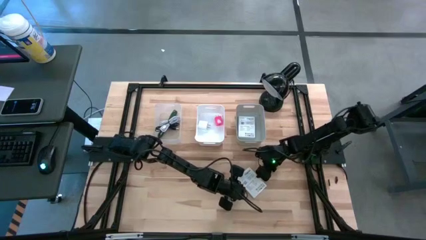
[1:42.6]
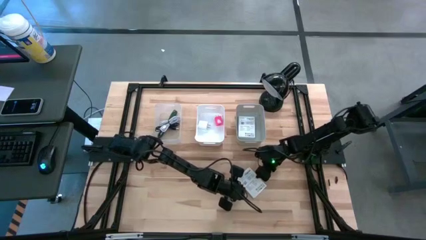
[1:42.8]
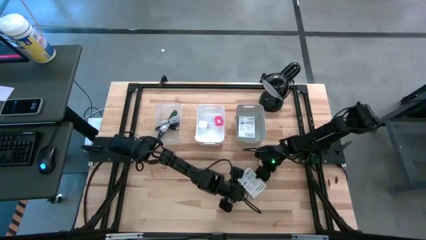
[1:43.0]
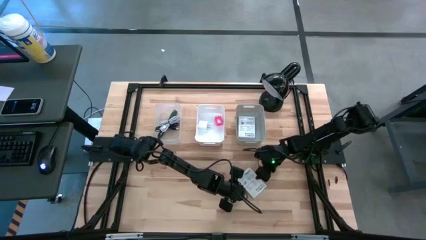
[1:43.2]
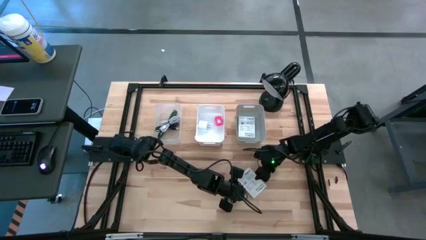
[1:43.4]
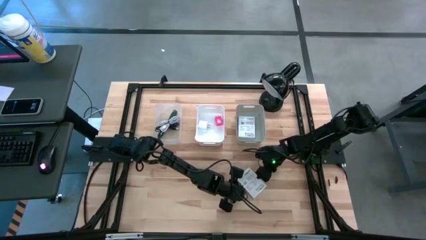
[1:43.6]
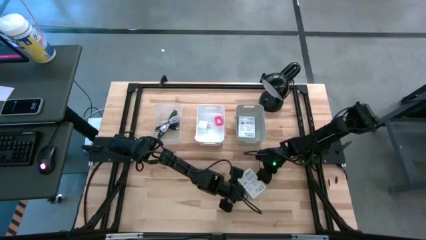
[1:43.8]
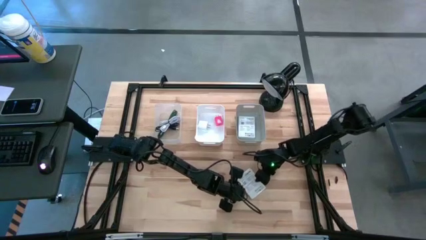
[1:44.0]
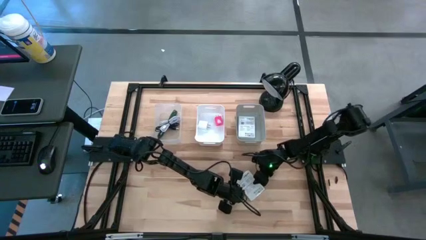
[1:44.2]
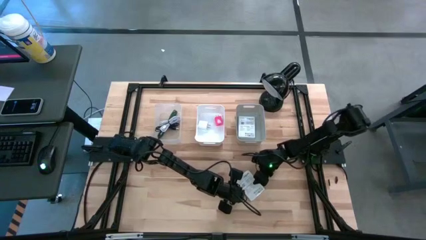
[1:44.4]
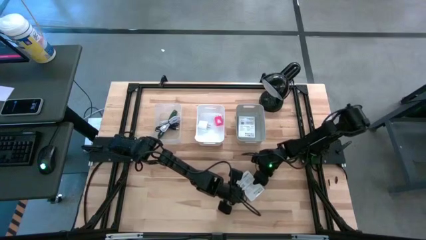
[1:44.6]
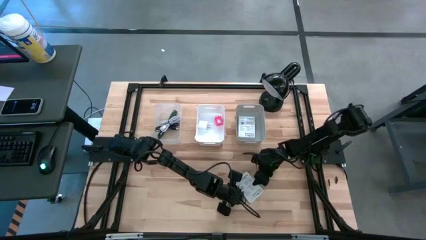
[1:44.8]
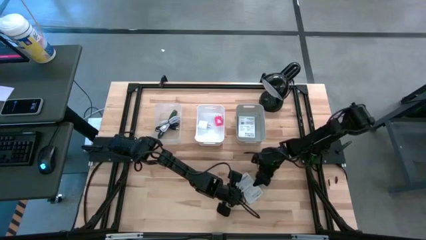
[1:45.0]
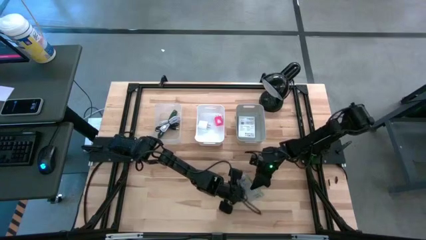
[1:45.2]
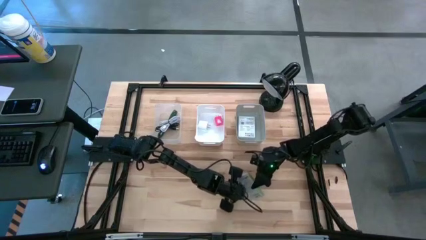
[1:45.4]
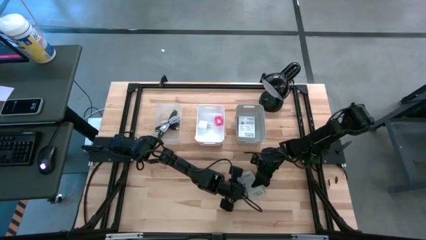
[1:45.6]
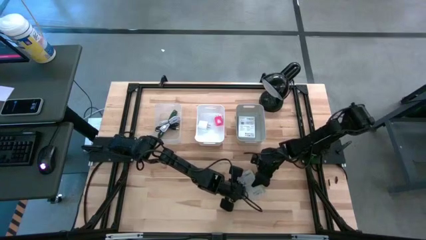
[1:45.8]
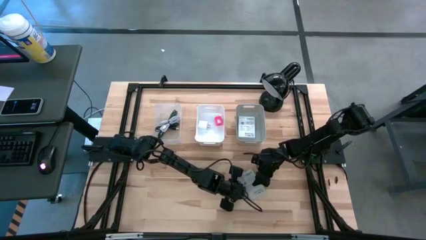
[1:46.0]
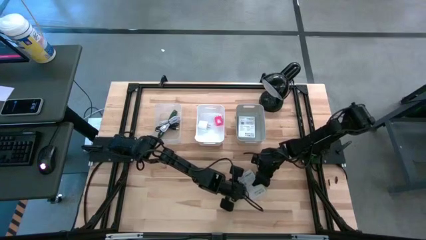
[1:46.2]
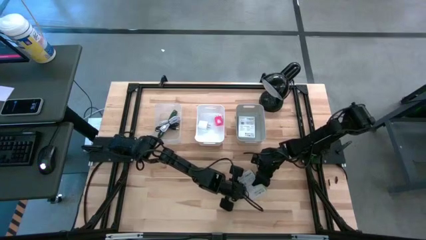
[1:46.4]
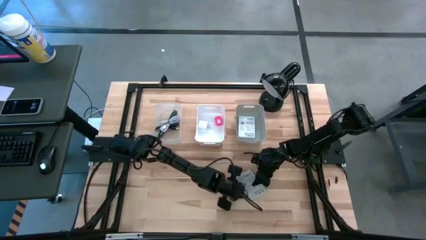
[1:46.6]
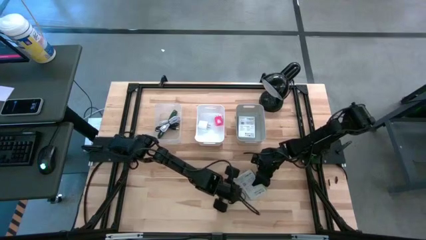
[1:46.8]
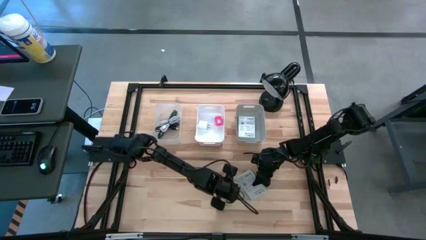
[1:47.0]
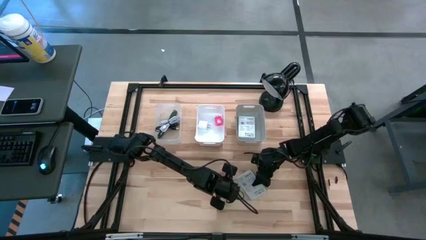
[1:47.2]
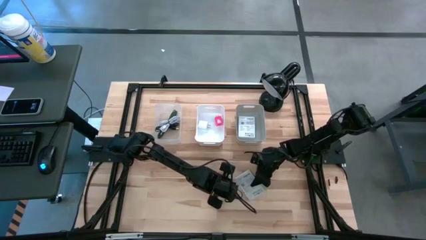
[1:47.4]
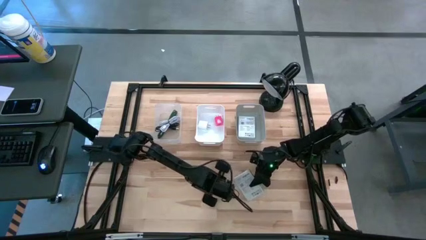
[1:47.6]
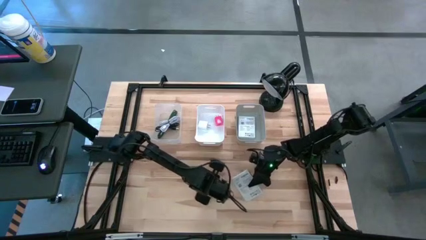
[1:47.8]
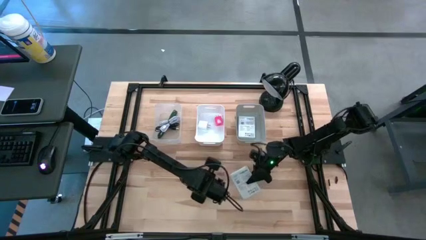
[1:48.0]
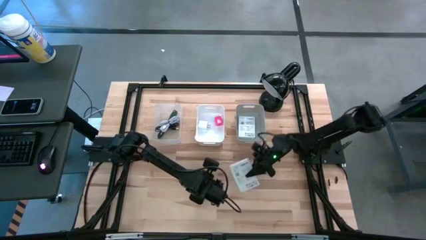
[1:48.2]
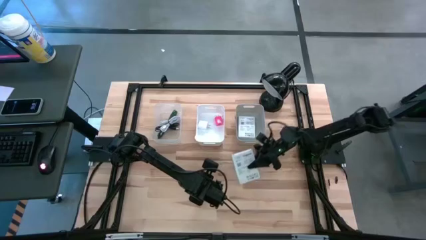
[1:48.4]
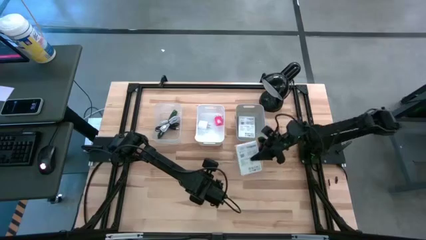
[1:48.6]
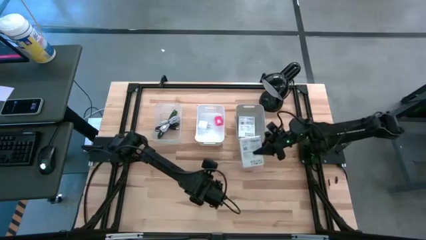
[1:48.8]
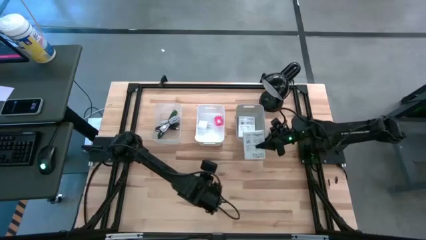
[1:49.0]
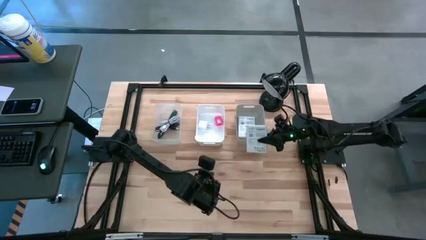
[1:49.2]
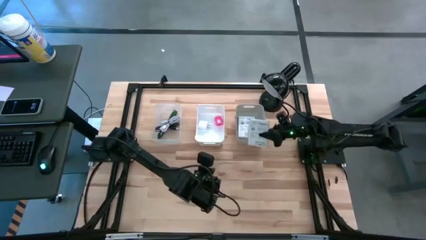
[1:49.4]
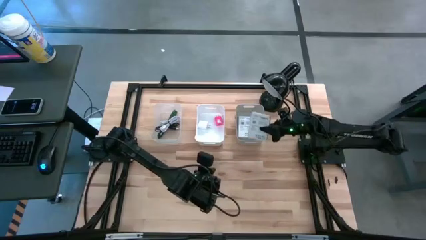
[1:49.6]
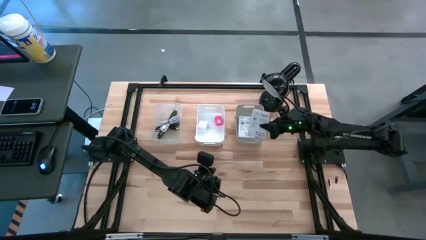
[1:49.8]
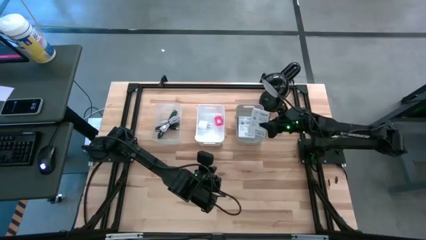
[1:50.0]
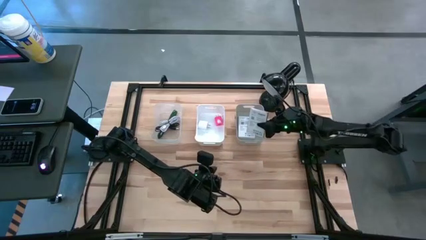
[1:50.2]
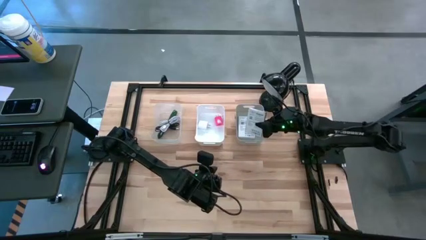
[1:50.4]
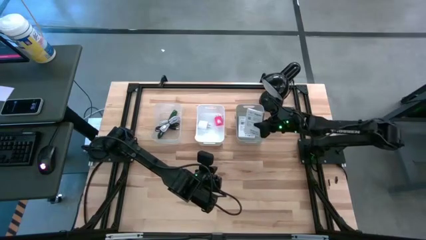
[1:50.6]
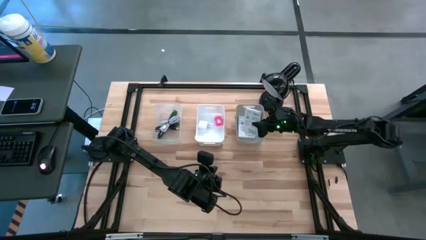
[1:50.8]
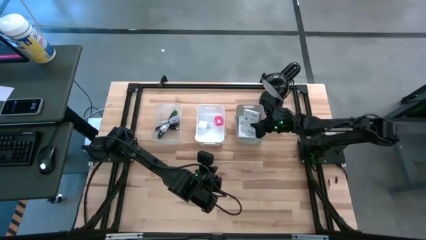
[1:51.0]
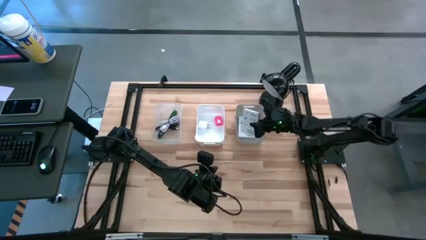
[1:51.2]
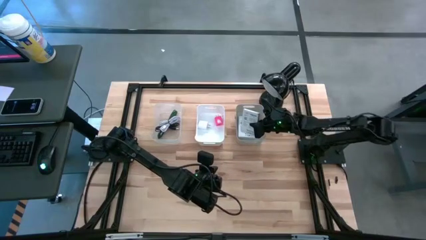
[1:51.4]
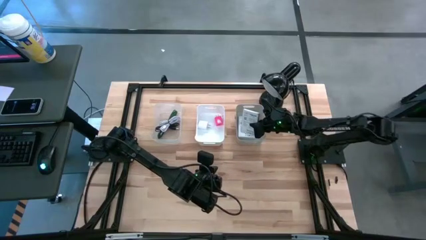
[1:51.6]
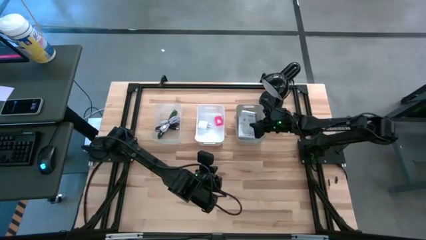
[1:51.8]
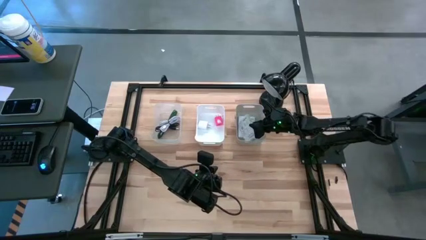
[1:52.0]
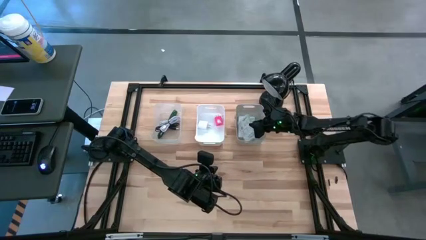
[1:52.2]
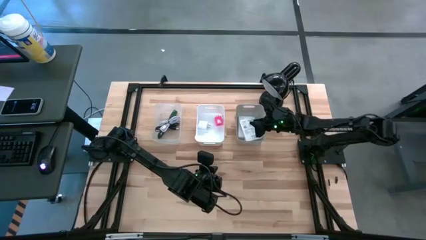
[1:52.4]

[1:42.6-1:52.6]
Task: Pick and place items into bin
Put the card reader into the gray bin
